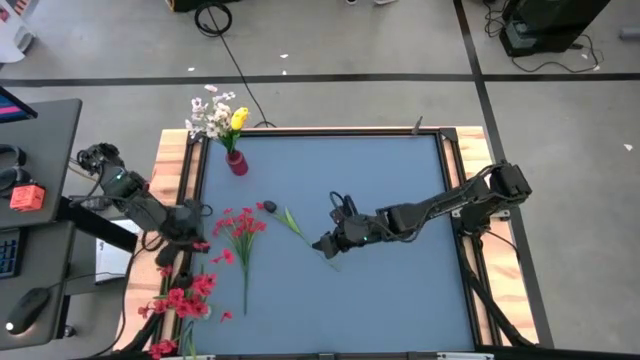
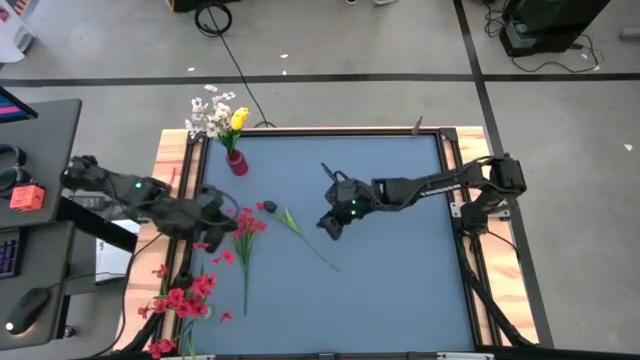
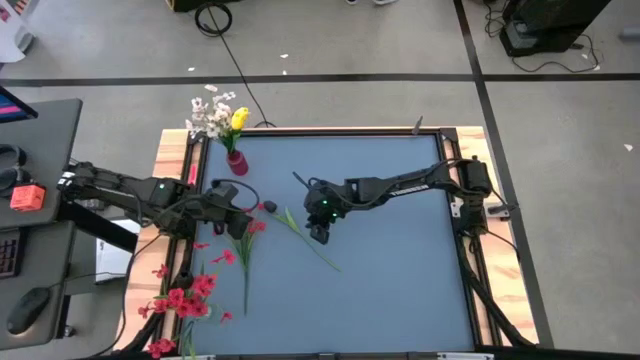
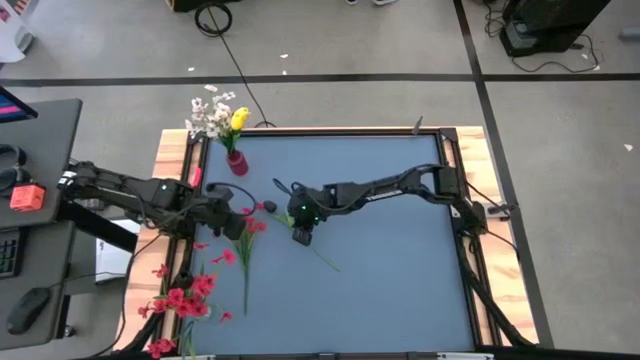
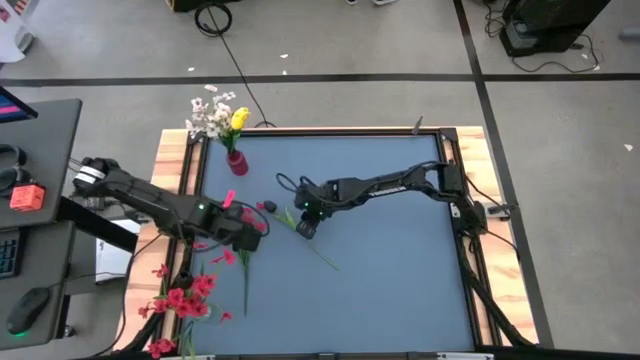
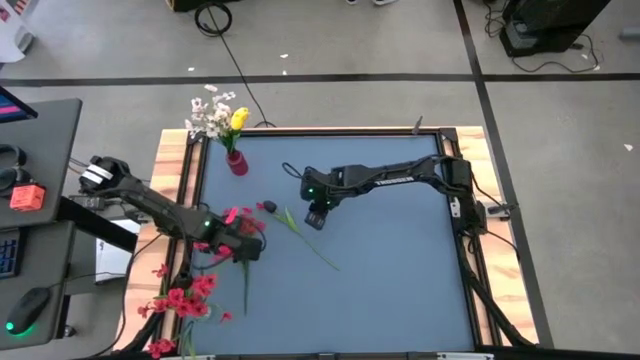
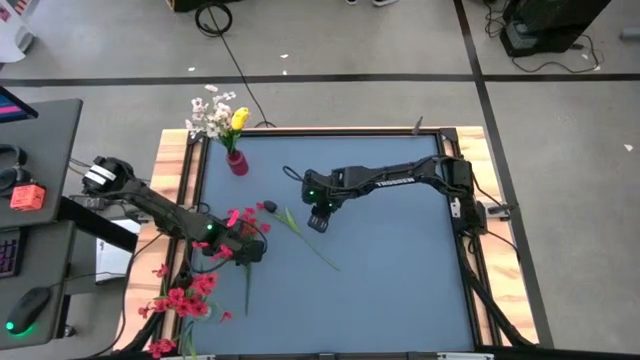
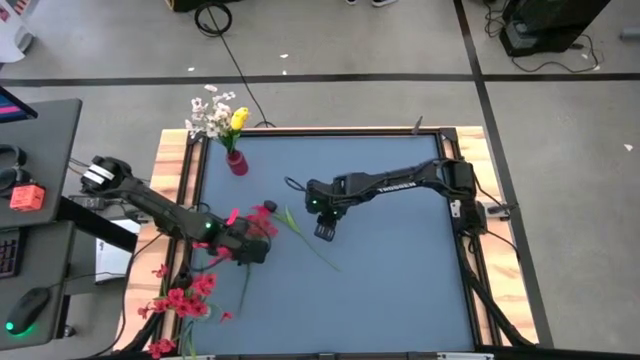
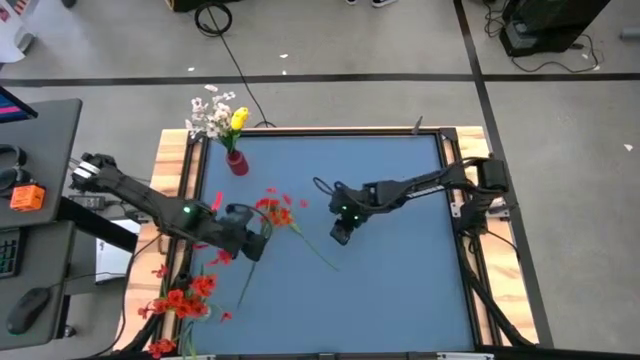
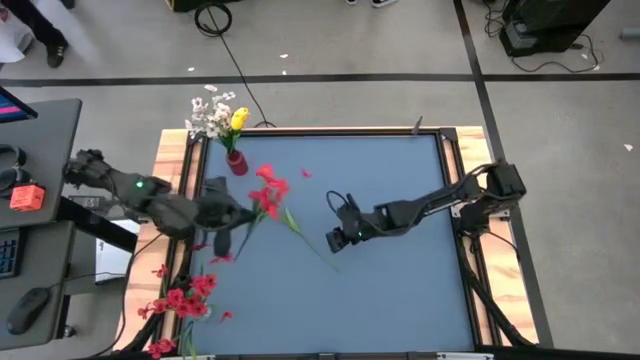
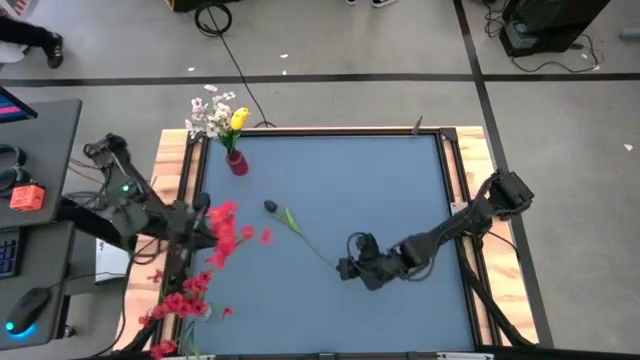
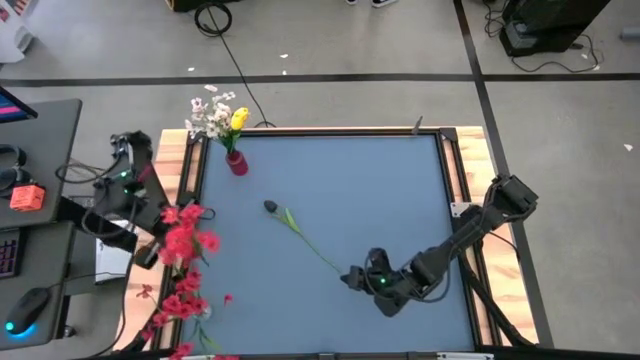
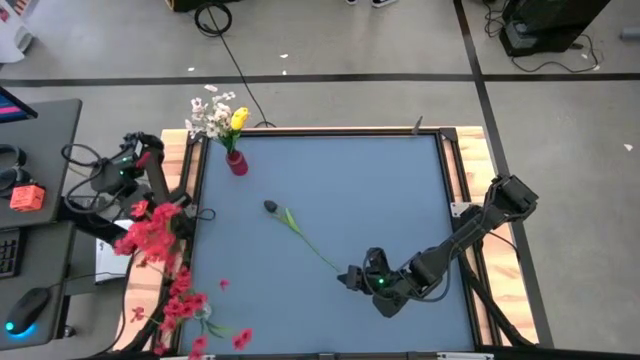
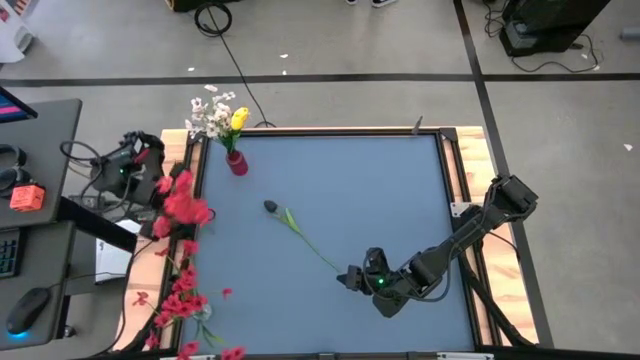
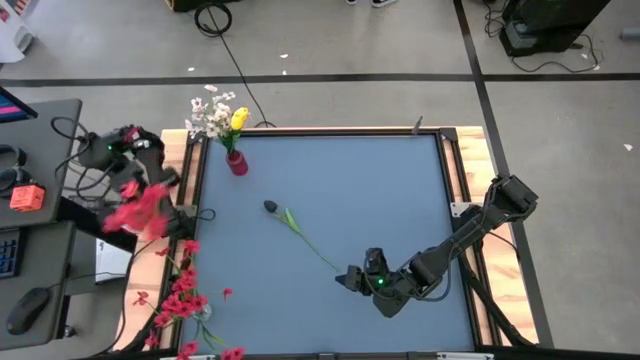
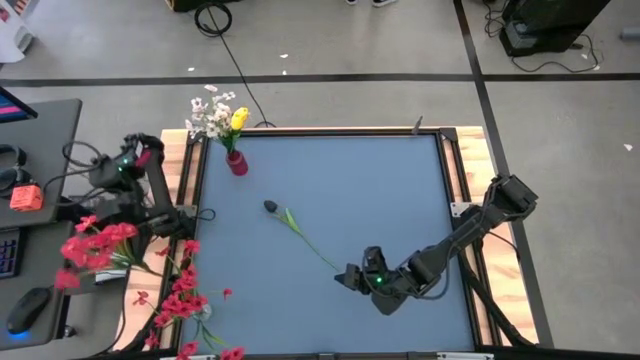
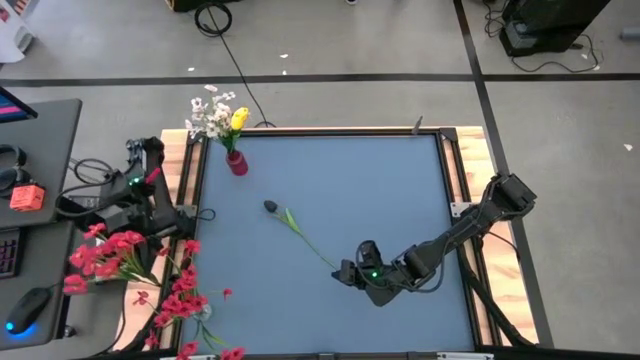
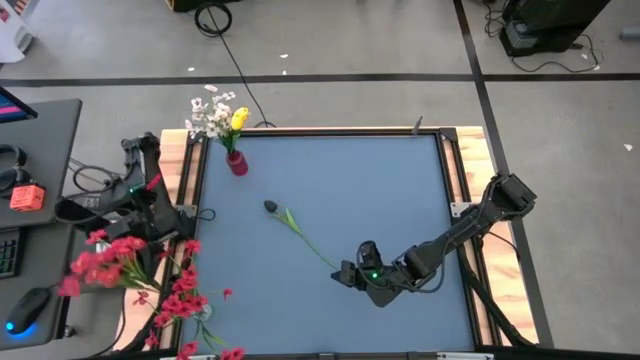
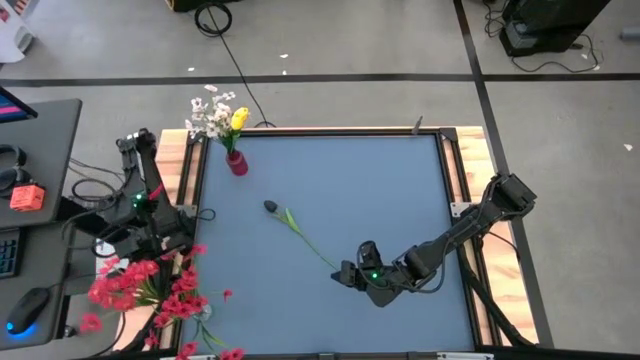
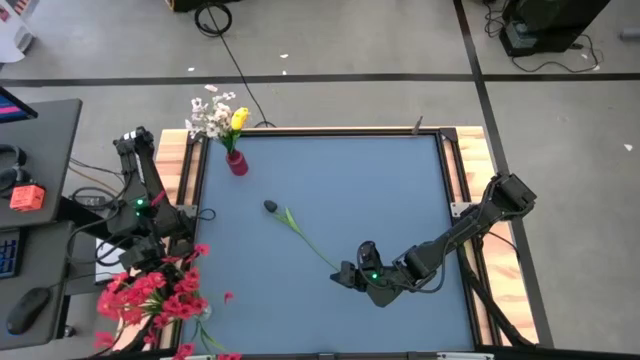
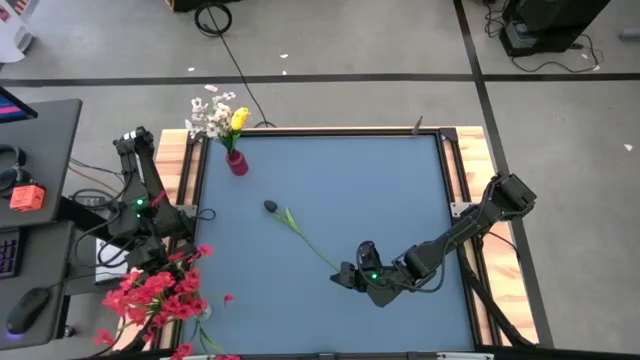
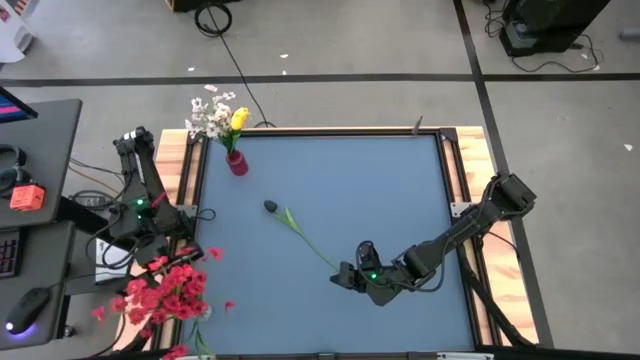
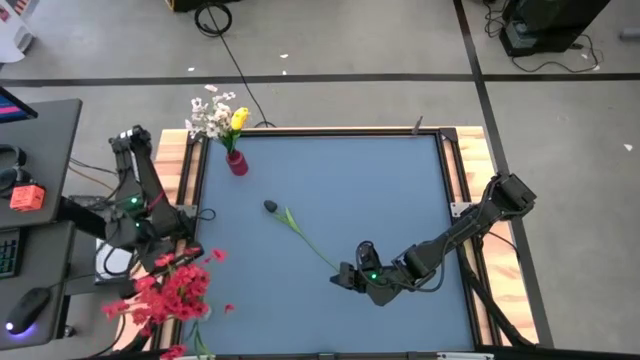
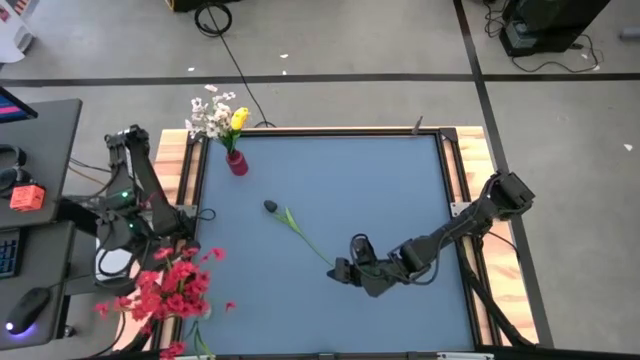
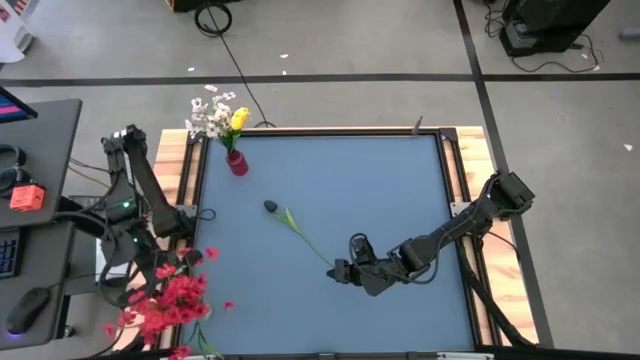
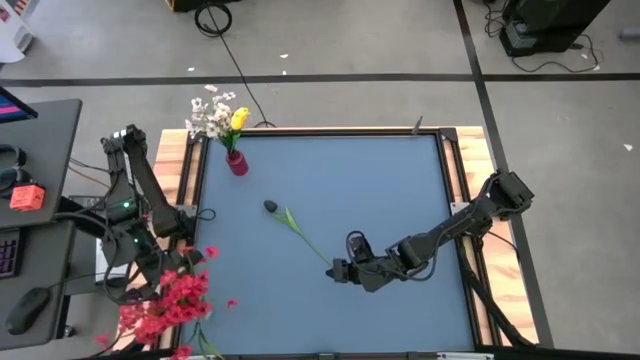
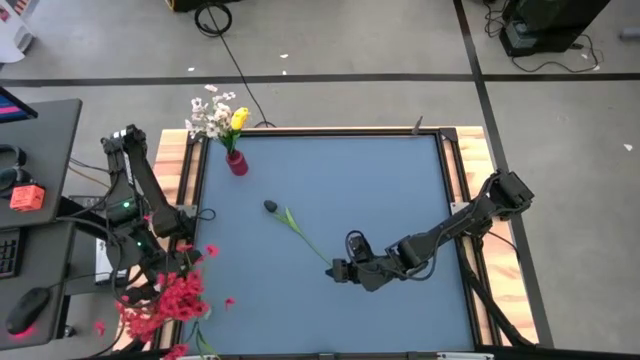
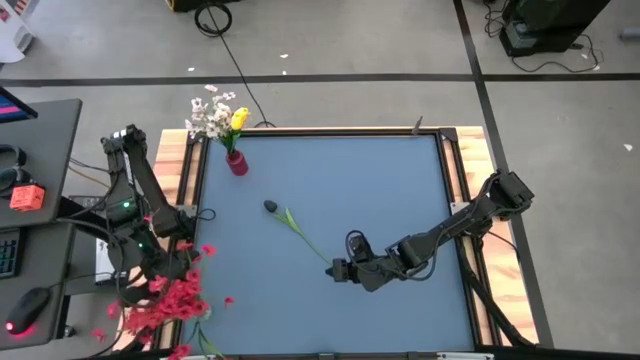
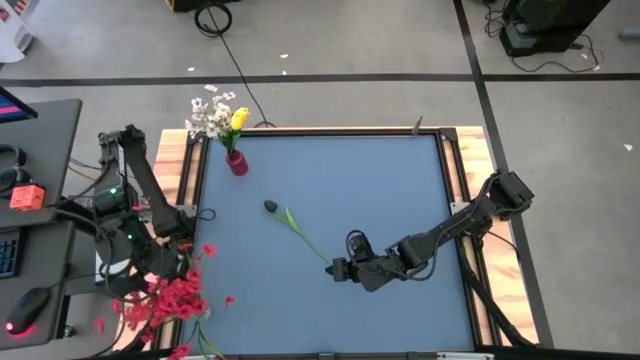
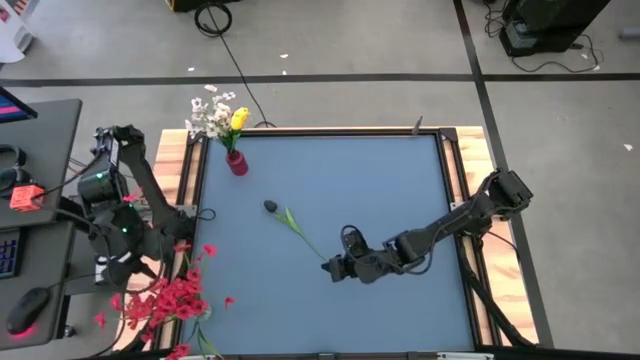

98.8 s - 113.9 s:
Task: Sort flowers into vase by color
Put the red flowers into the transparent vase

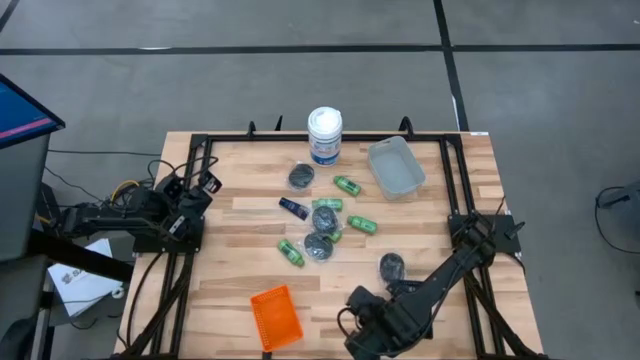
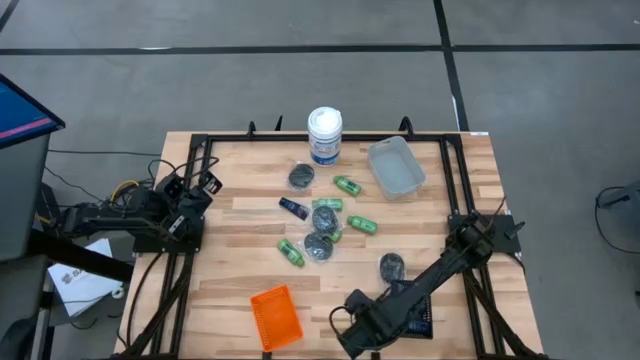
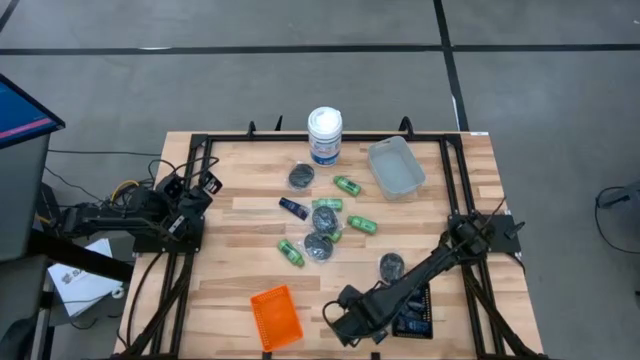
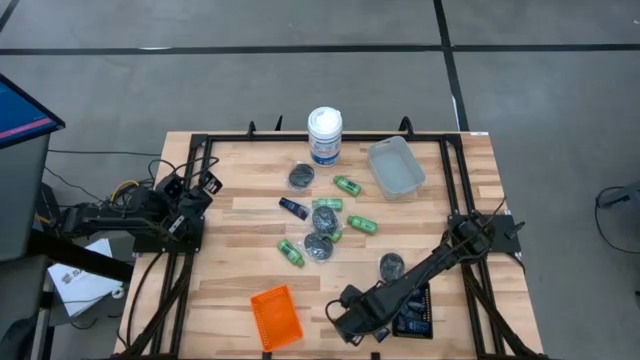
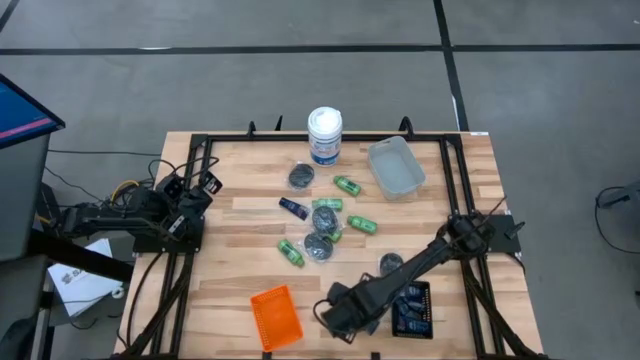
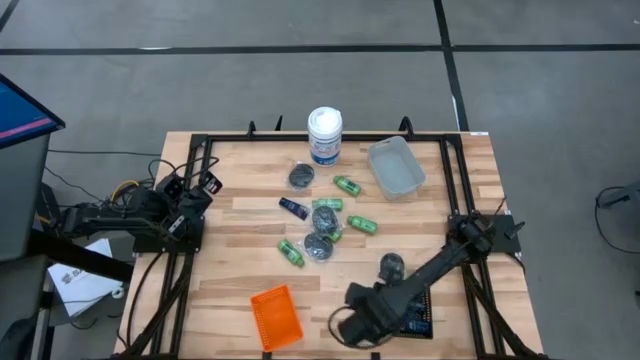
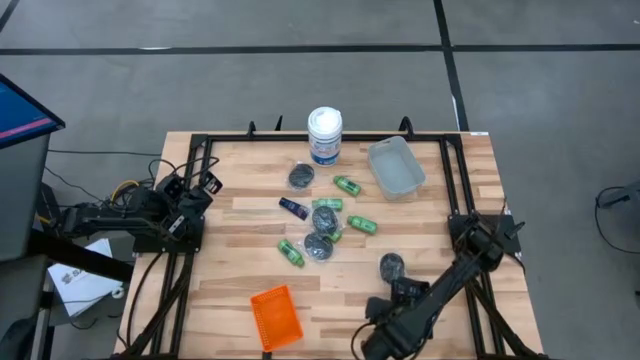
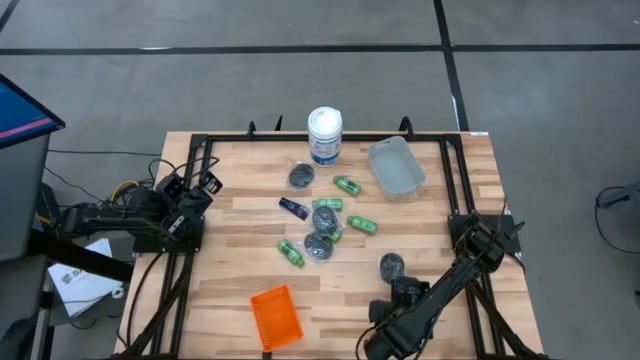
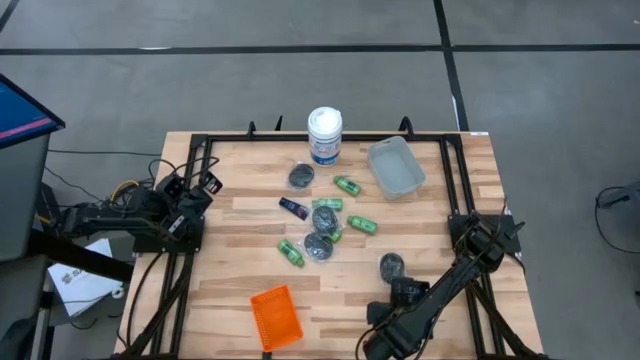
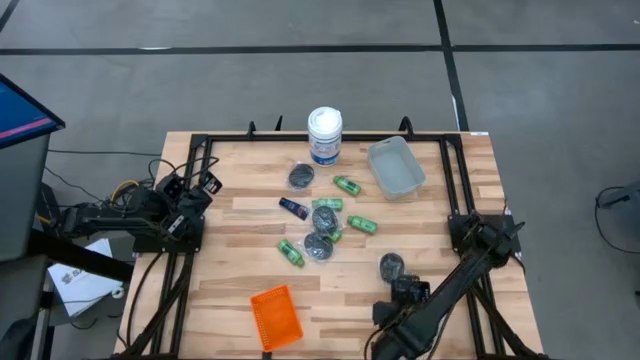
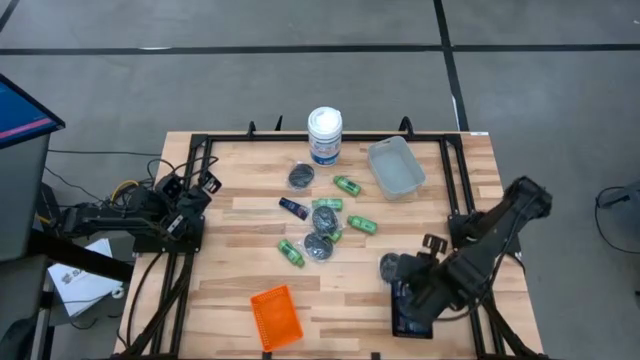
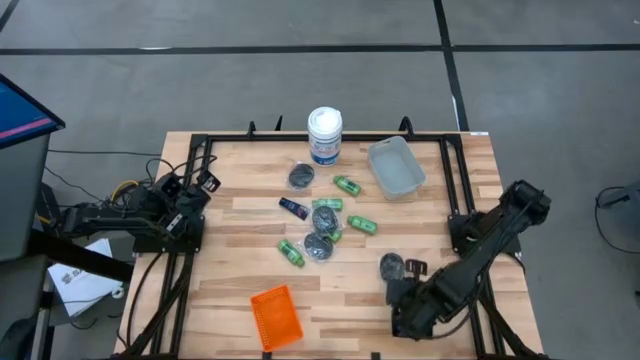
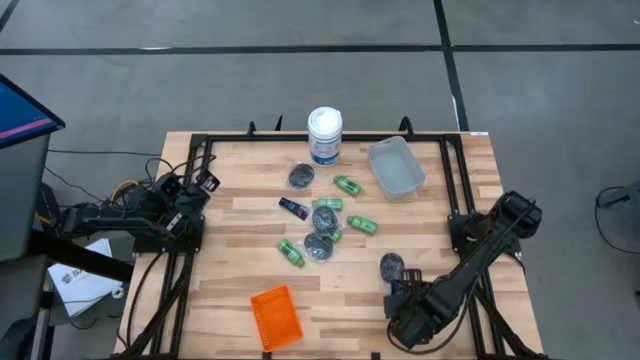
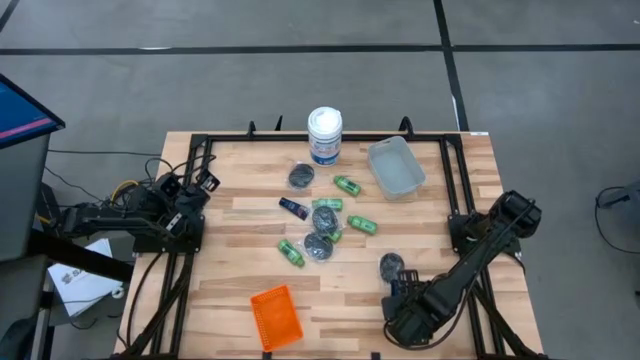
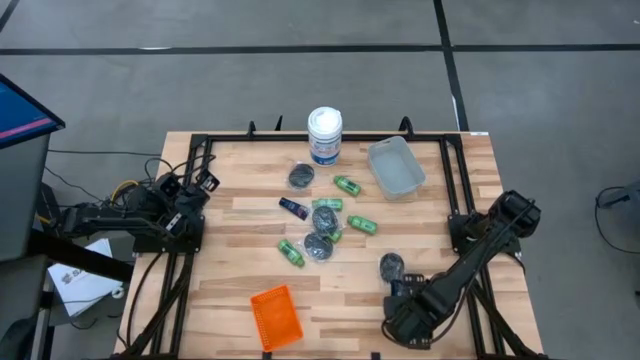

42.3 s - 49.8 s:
Task: Pick & Place Travel size toiletries
Put the blue shave cream into the black basket
